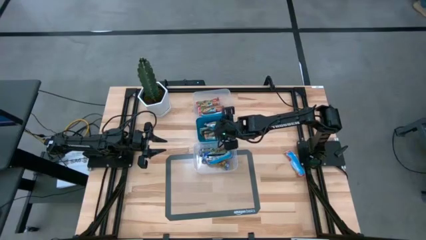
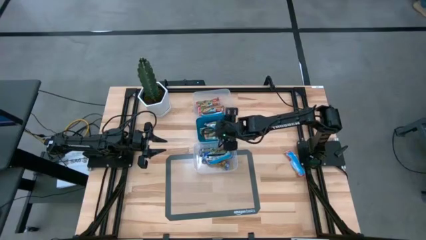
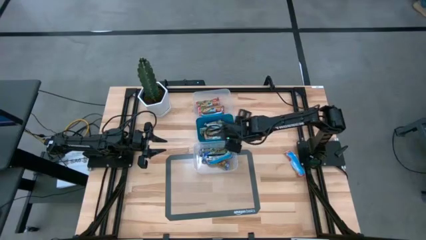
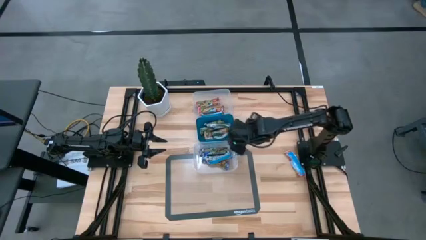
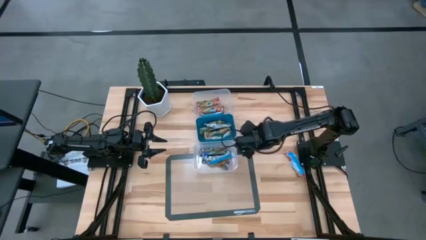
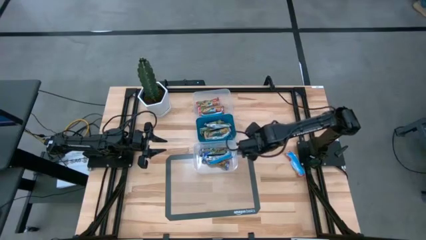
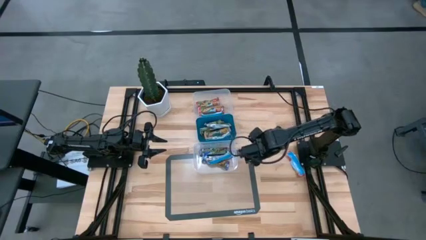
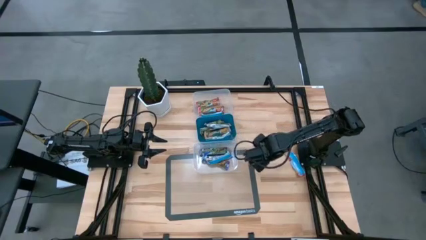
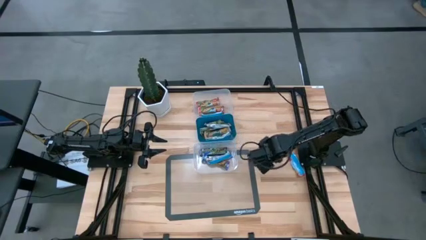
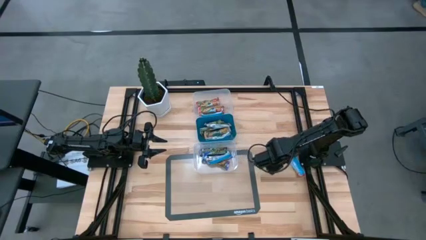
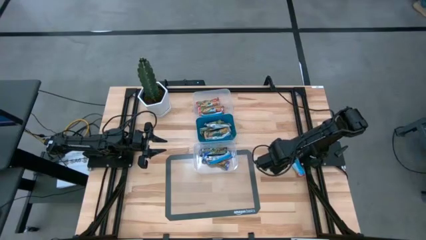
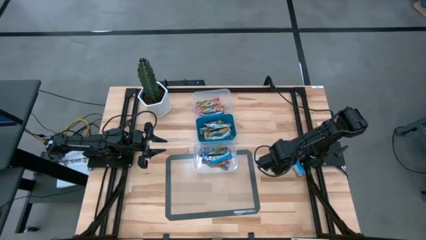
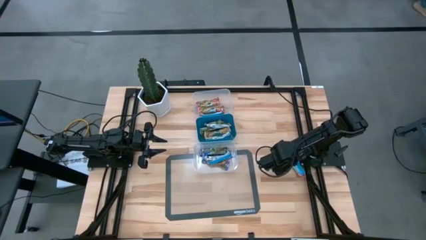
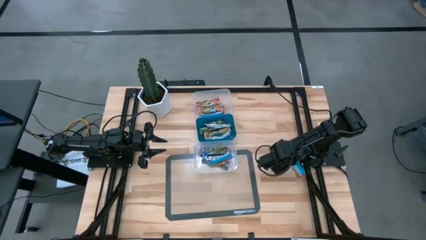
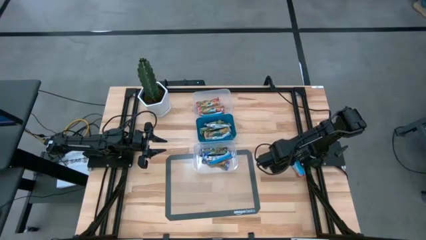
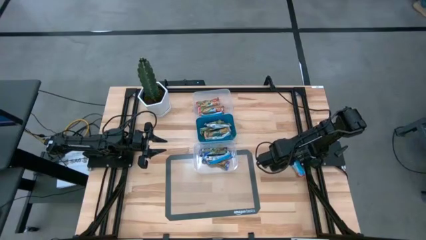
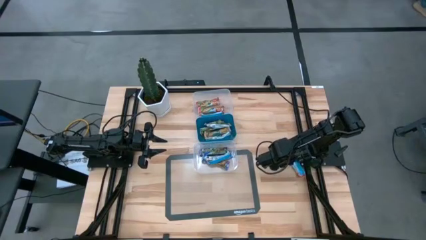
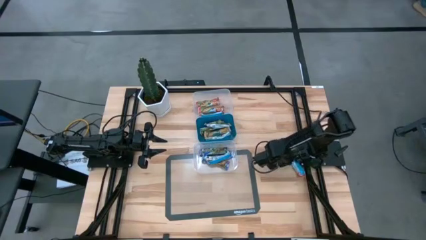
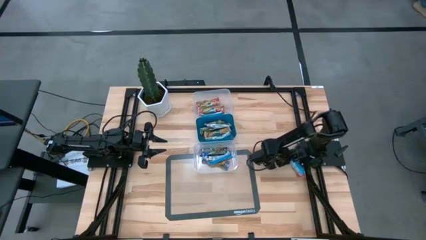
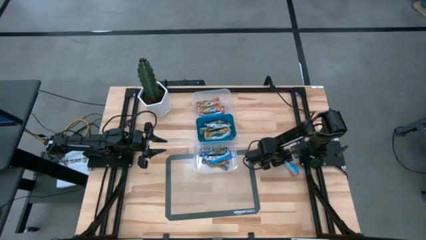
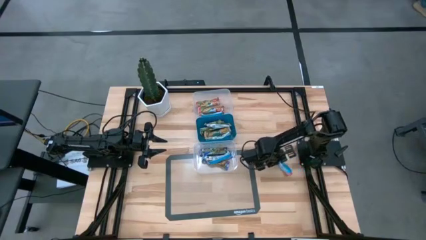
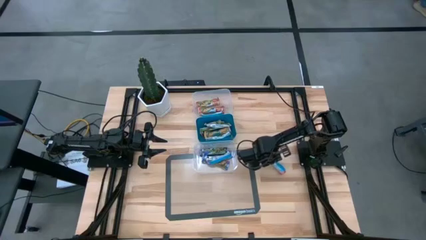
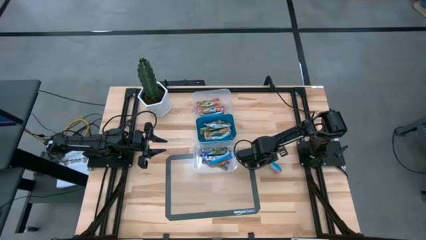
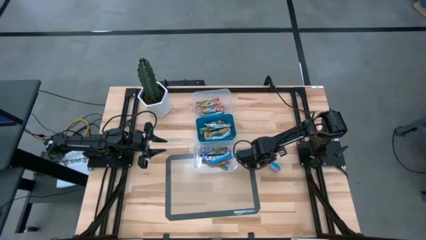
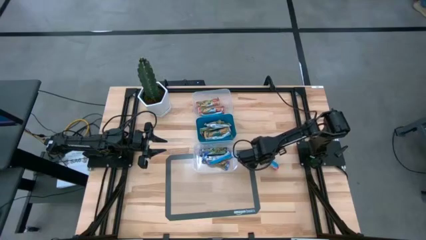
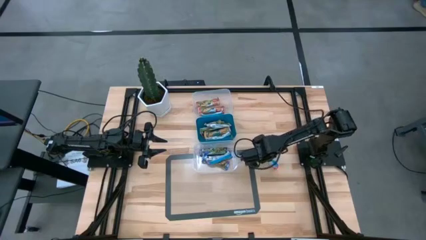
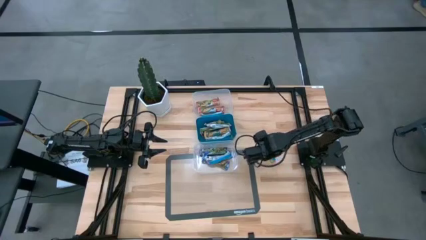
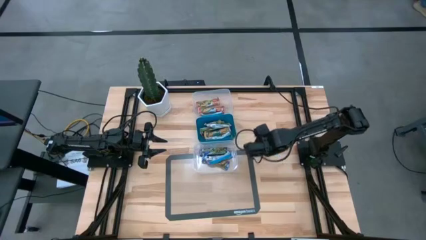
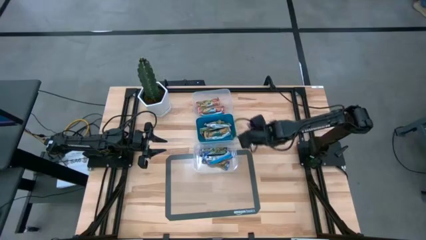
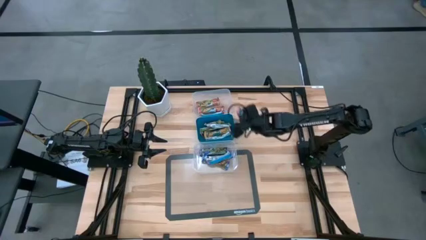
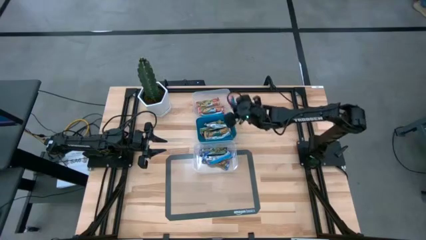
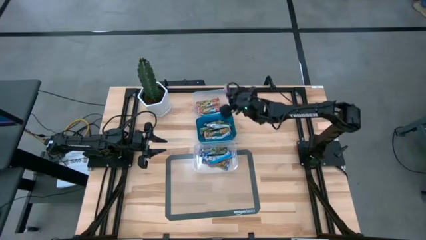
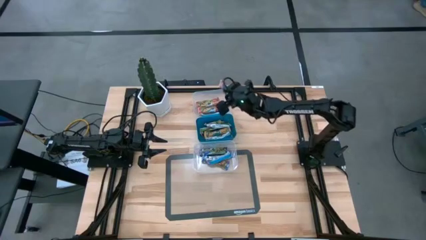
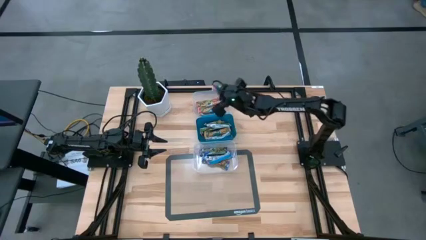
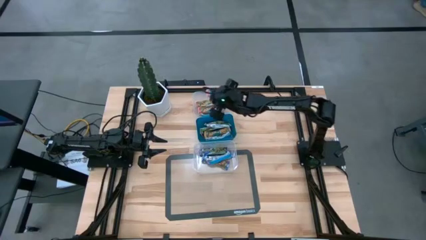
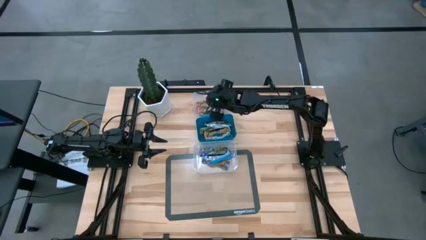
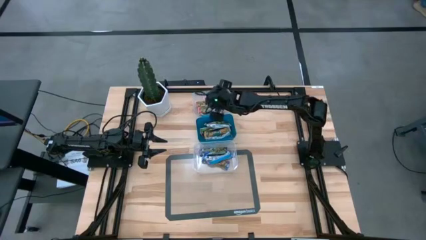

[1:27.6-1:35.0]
Task: Pick and place Granola Bars by type
Put the red granola bar into the top transparent bin

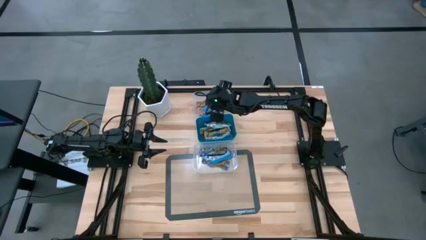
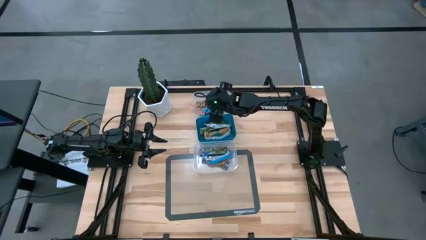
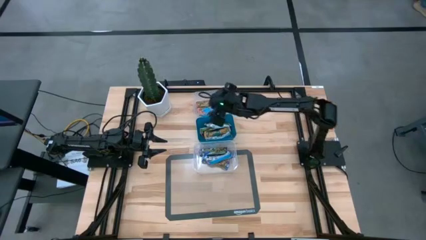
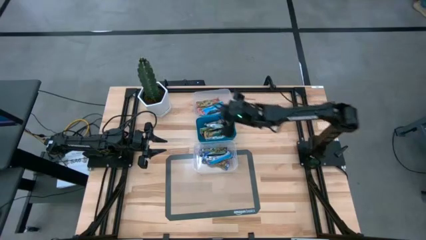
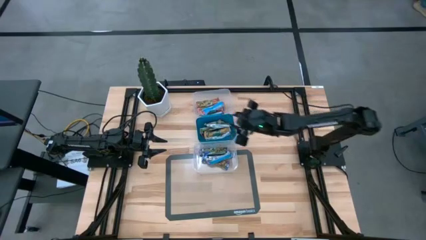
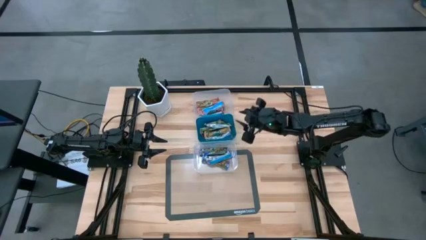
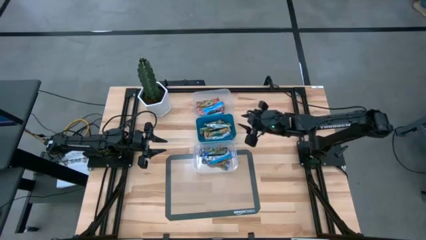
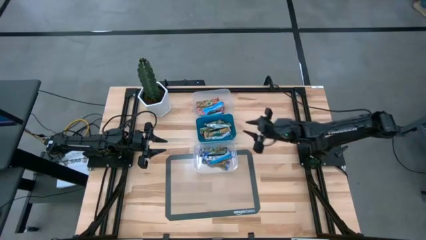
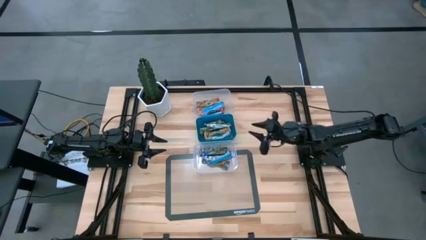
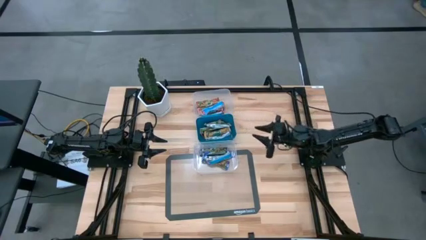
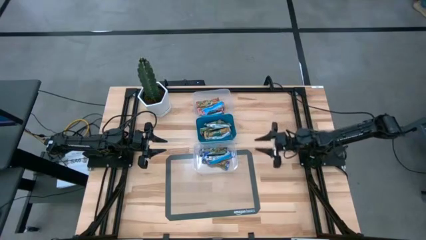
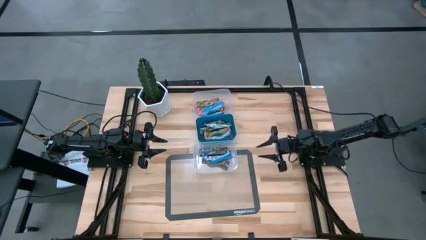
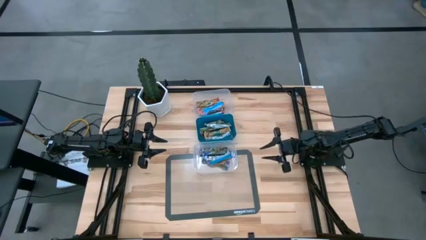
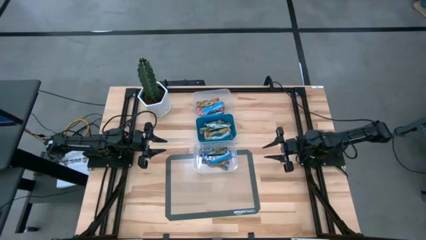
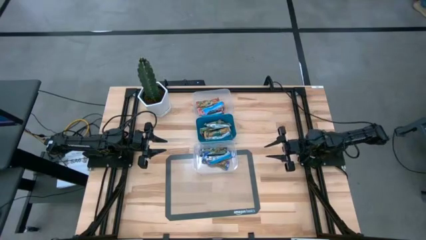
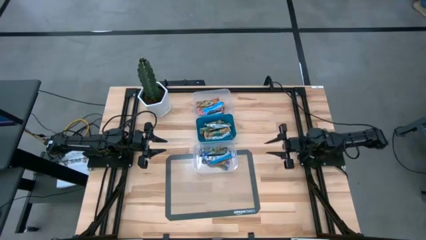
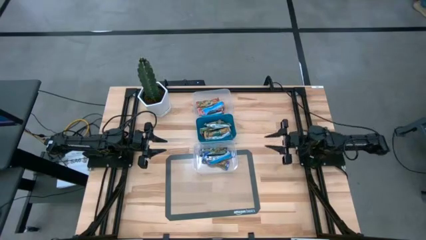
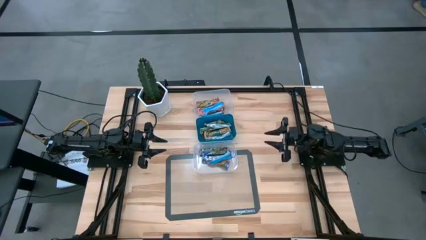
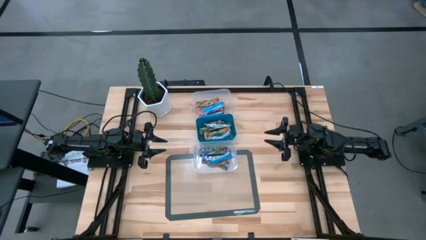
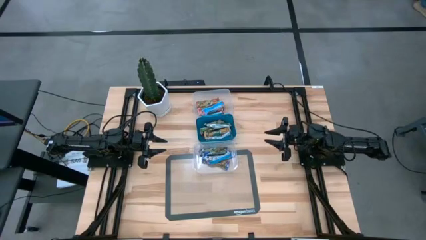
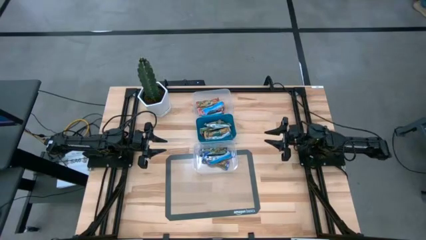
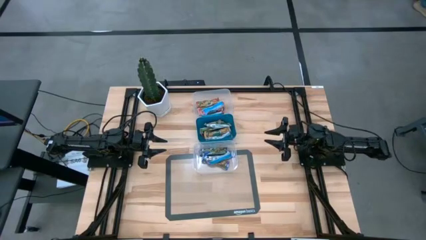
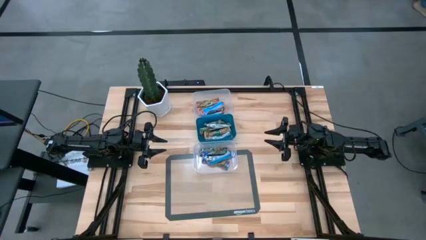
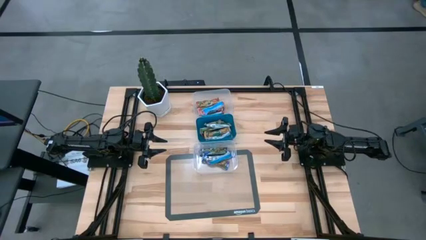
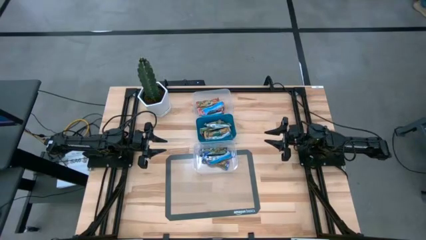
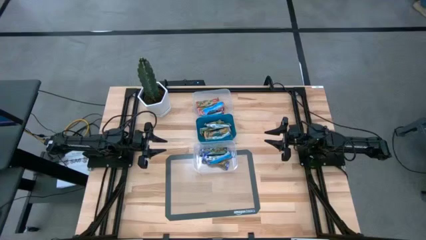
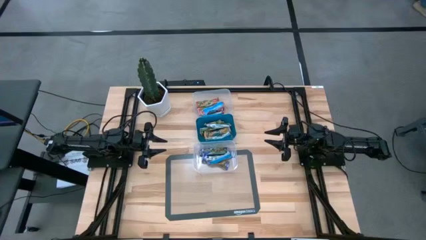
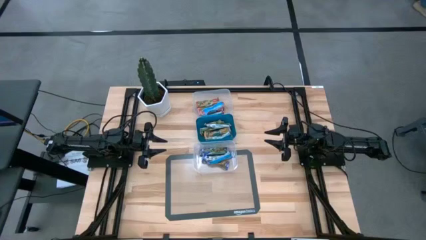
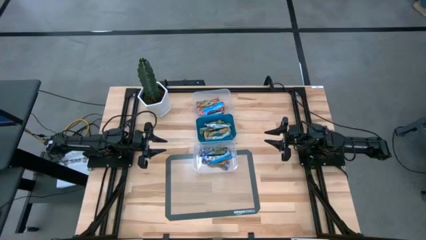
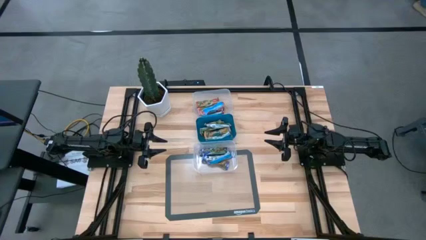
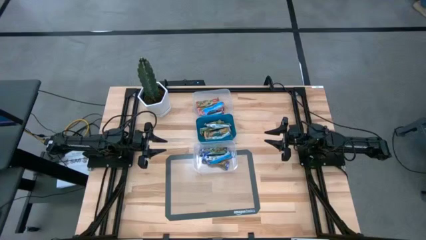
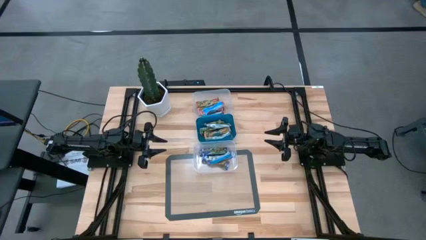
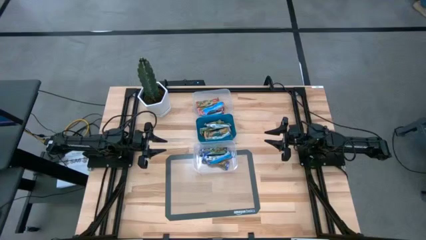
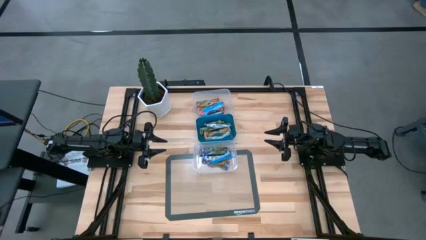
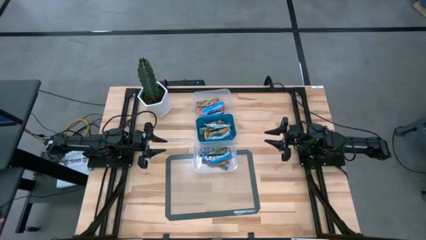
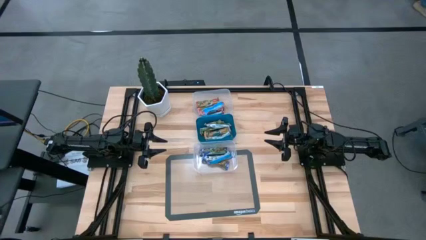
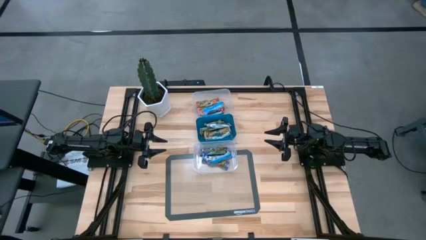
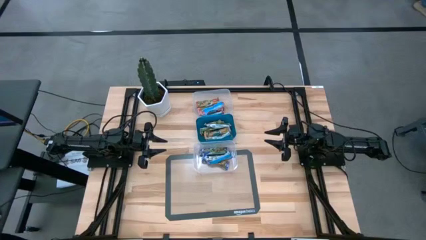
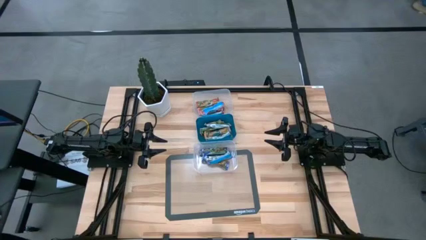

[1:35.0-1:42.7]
Return to Home Position

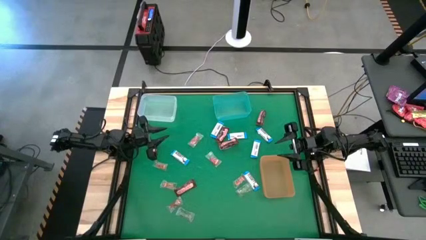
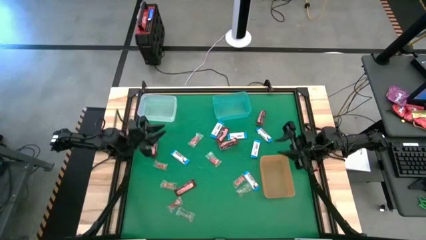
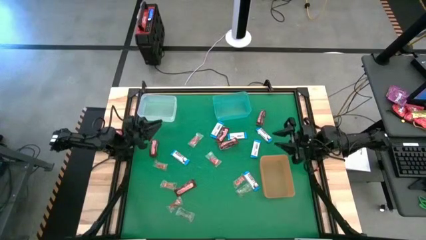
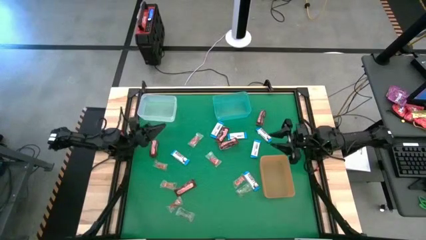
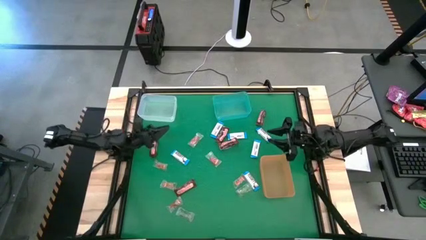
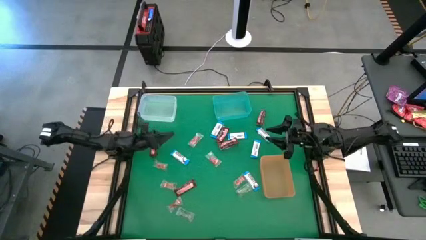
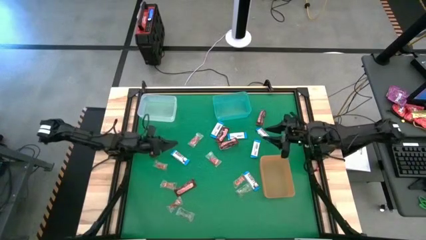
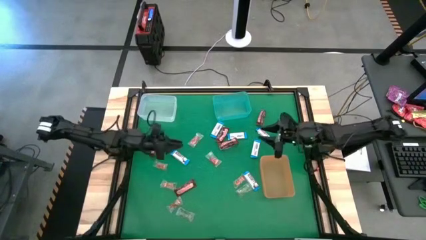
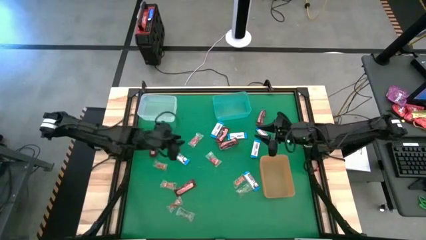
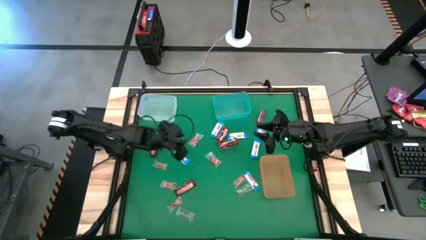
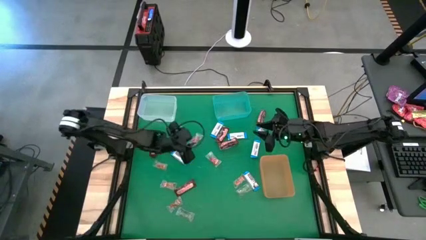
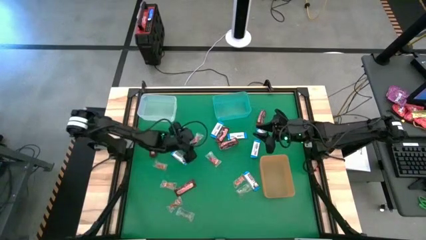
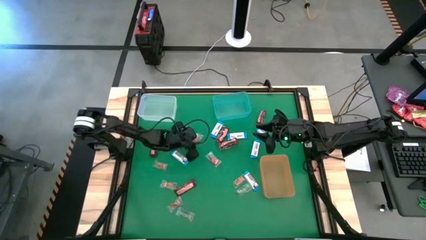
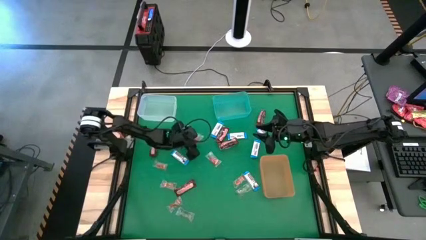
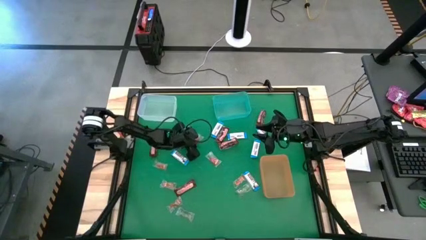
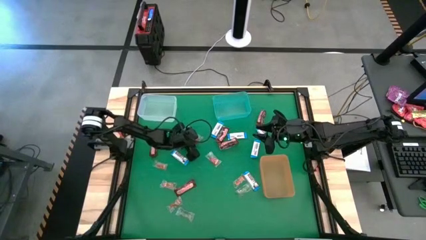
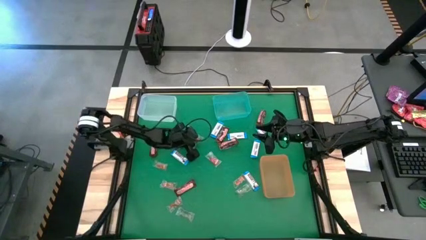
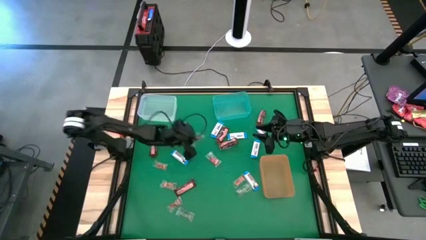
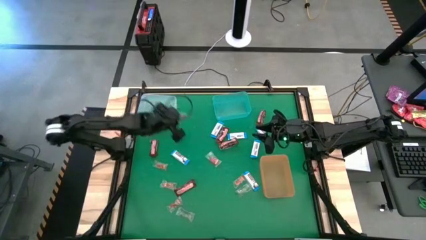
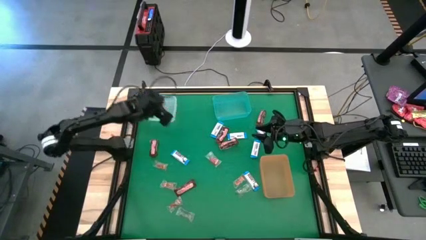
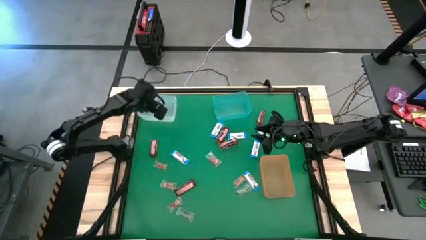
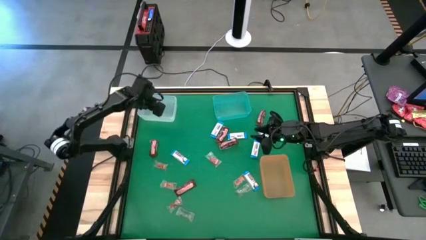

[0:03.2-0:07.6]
Task: Sort candy by brand, put in halloween buckets
Put the red gummy into the white bin
